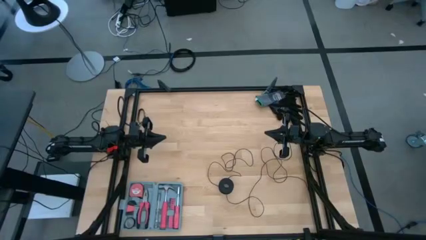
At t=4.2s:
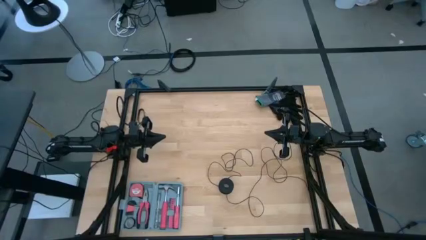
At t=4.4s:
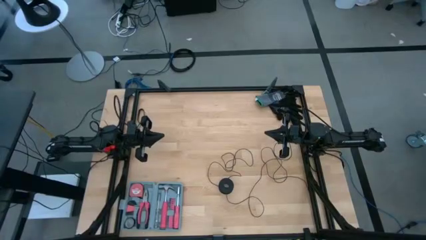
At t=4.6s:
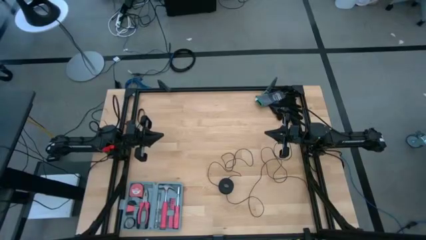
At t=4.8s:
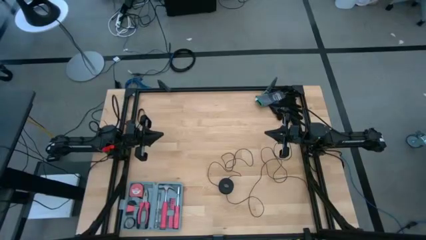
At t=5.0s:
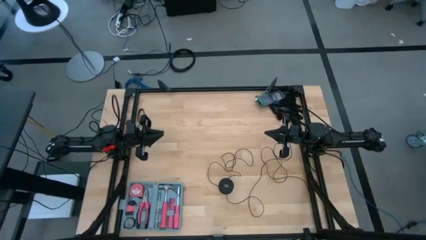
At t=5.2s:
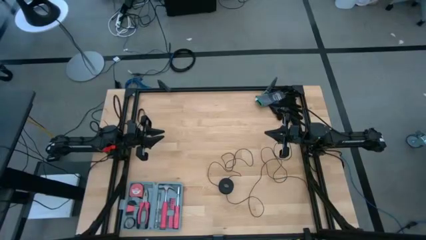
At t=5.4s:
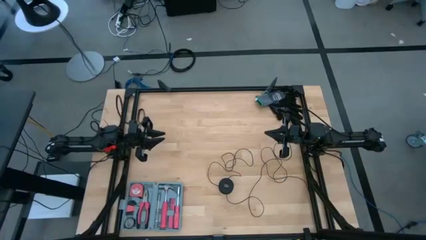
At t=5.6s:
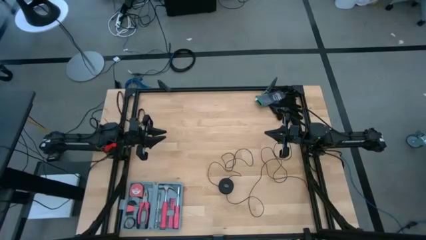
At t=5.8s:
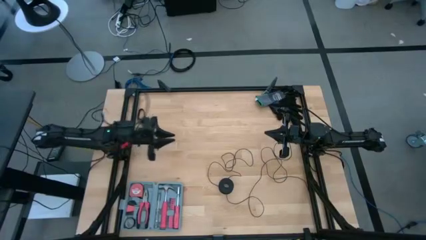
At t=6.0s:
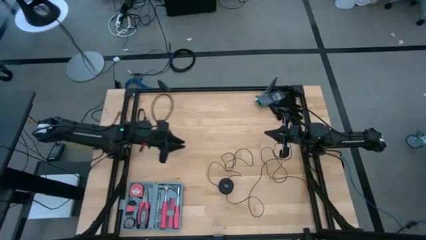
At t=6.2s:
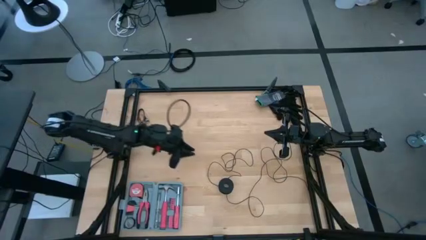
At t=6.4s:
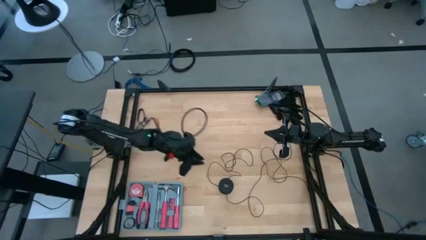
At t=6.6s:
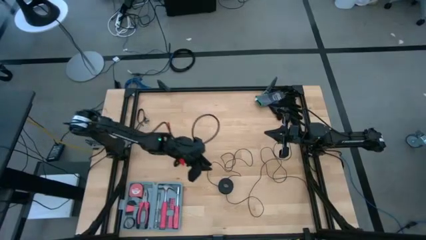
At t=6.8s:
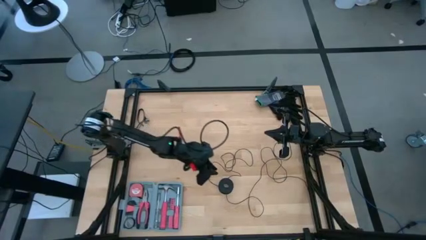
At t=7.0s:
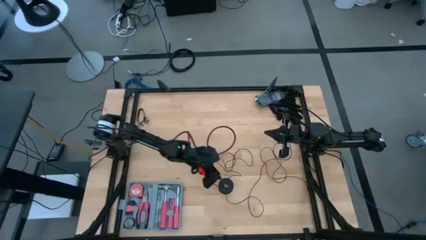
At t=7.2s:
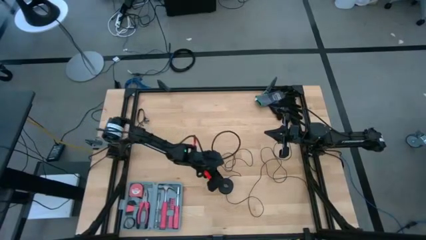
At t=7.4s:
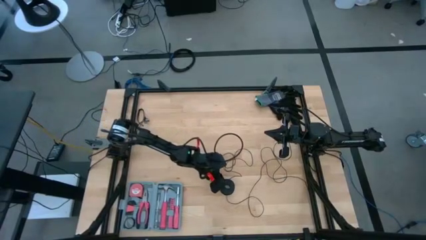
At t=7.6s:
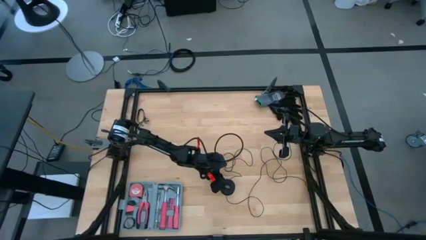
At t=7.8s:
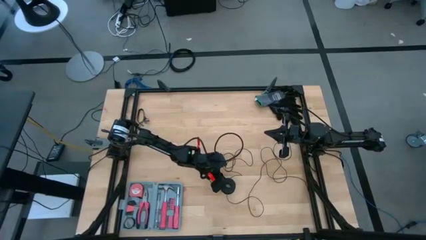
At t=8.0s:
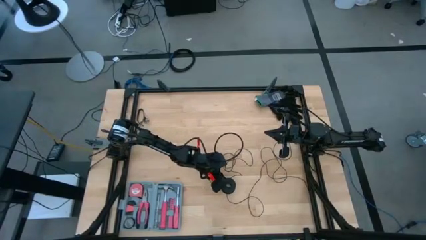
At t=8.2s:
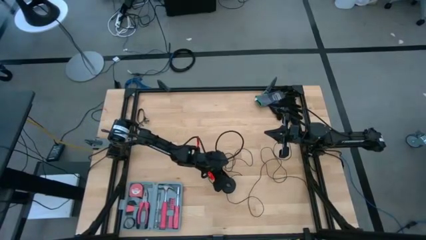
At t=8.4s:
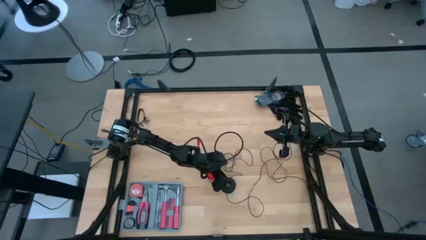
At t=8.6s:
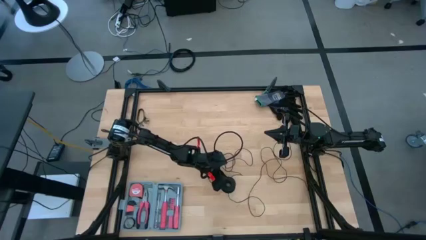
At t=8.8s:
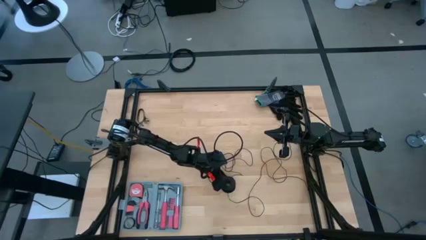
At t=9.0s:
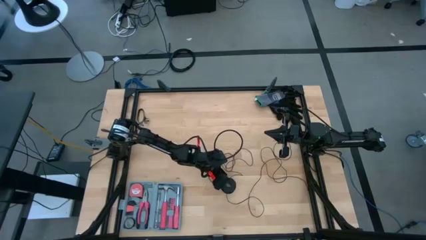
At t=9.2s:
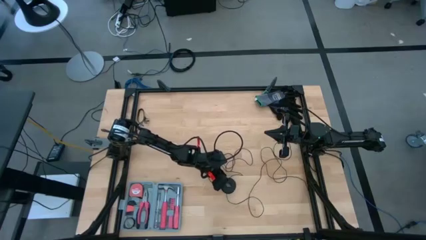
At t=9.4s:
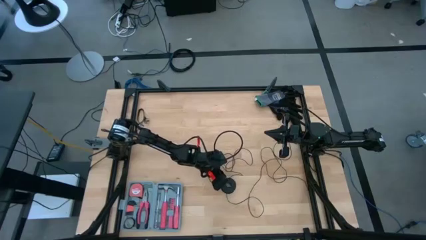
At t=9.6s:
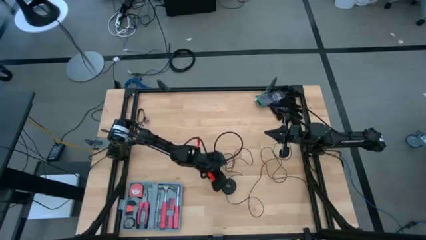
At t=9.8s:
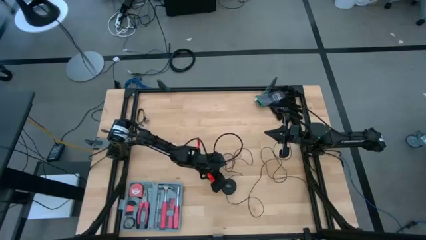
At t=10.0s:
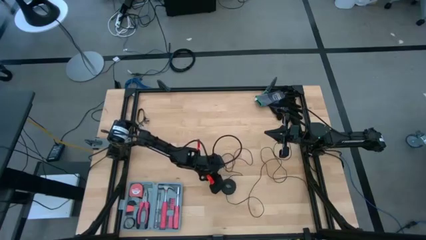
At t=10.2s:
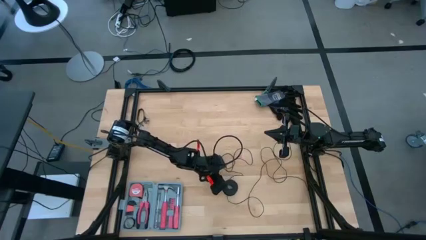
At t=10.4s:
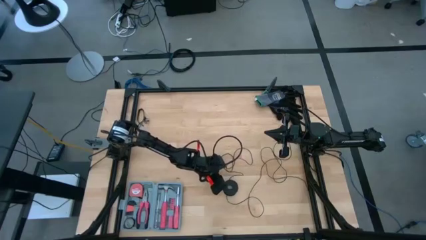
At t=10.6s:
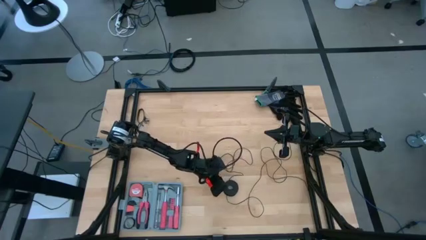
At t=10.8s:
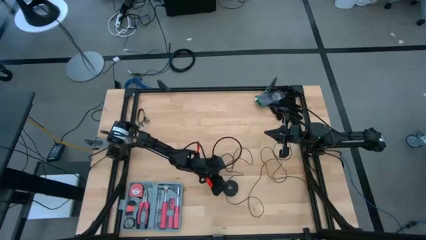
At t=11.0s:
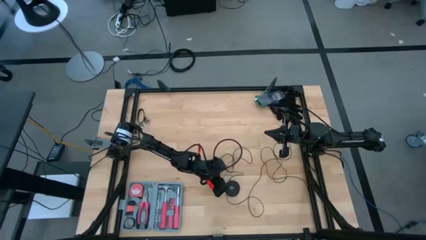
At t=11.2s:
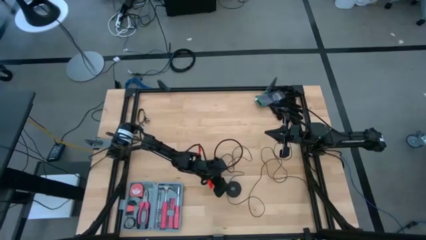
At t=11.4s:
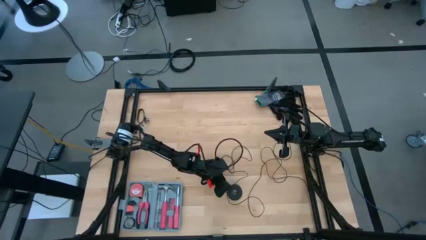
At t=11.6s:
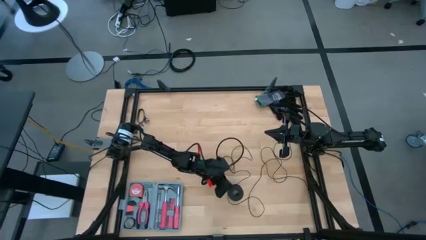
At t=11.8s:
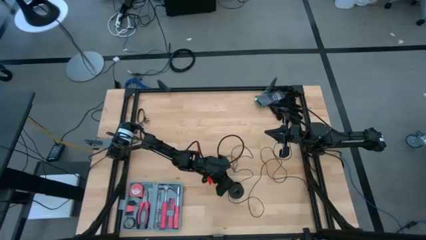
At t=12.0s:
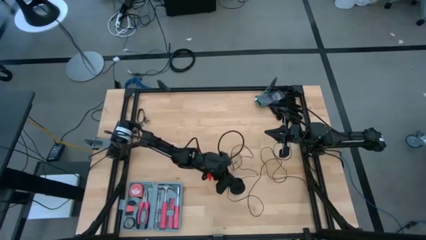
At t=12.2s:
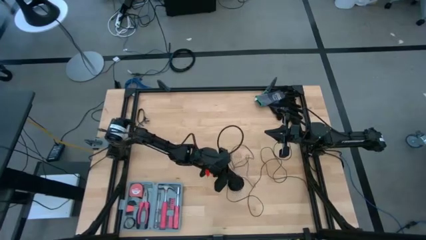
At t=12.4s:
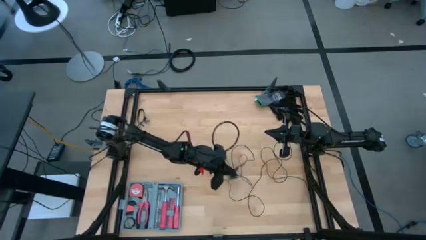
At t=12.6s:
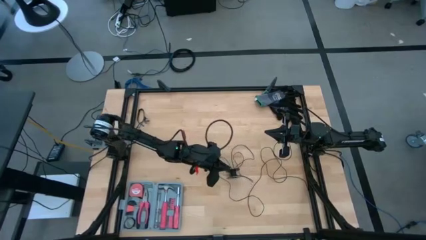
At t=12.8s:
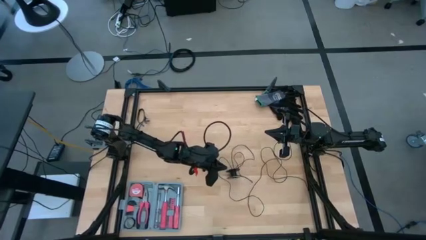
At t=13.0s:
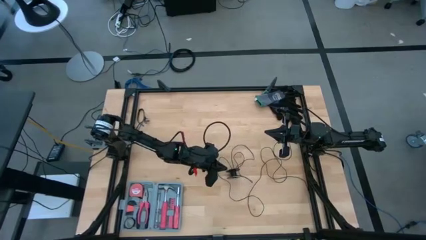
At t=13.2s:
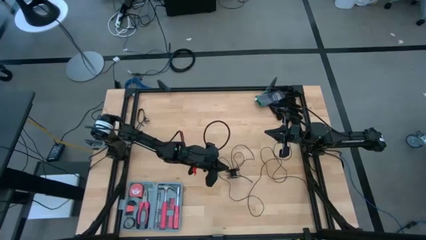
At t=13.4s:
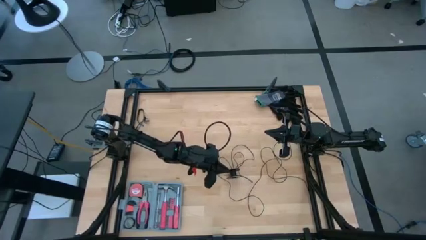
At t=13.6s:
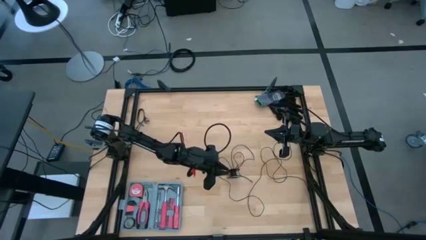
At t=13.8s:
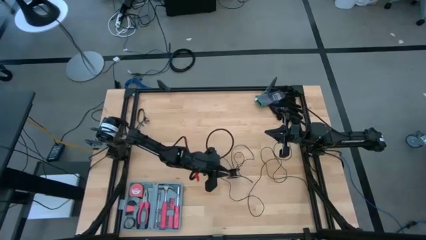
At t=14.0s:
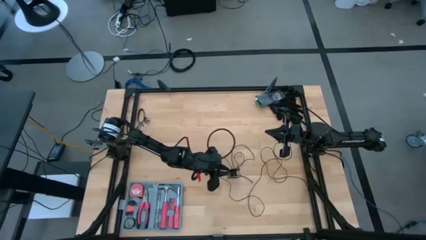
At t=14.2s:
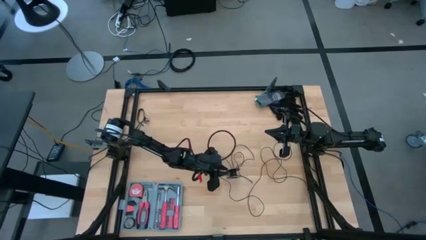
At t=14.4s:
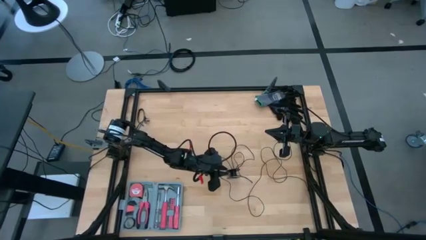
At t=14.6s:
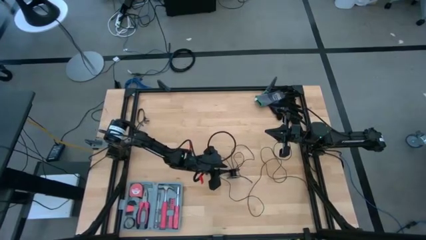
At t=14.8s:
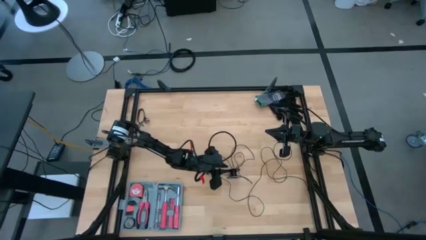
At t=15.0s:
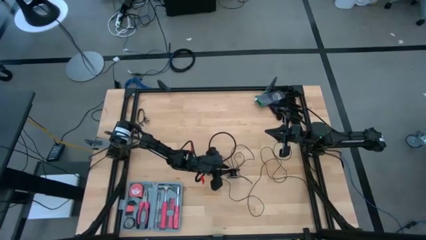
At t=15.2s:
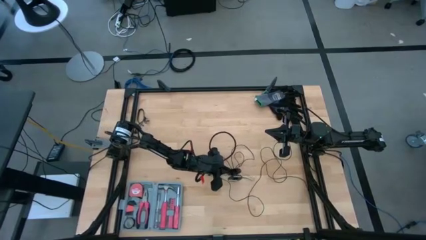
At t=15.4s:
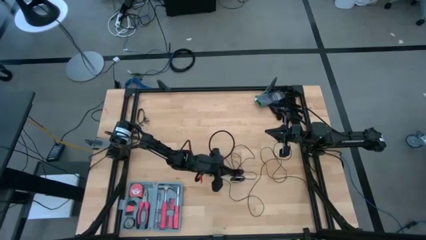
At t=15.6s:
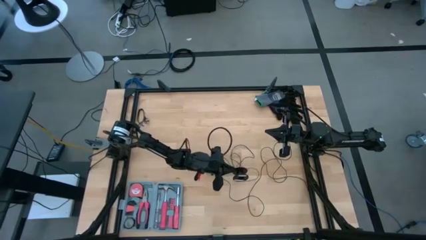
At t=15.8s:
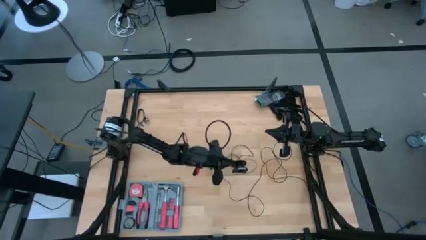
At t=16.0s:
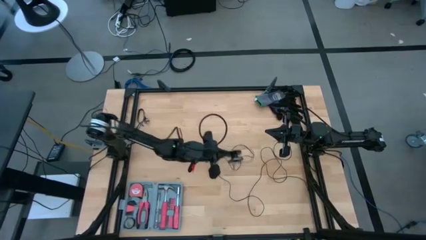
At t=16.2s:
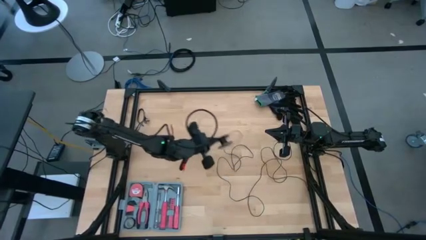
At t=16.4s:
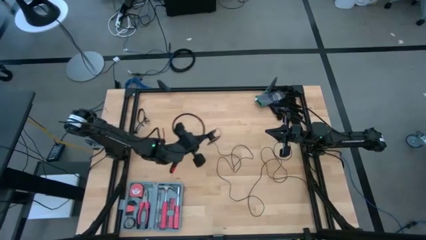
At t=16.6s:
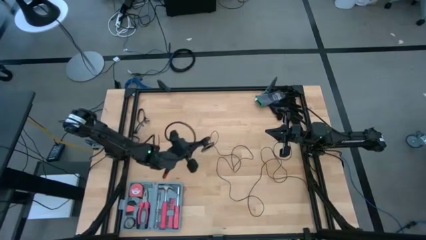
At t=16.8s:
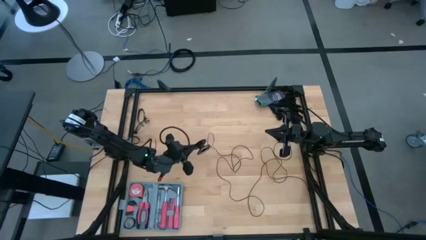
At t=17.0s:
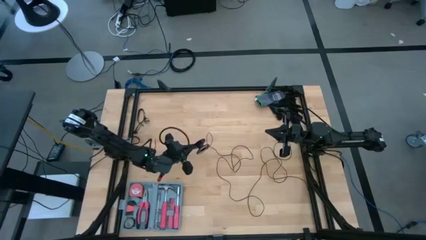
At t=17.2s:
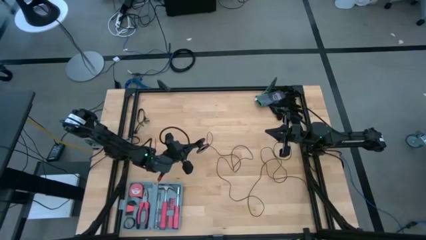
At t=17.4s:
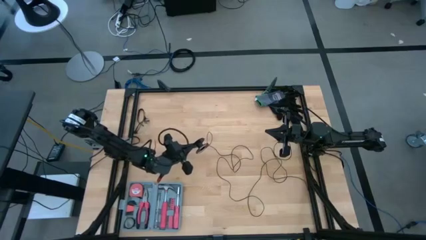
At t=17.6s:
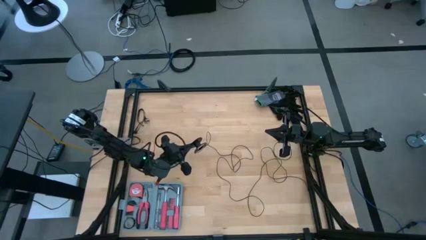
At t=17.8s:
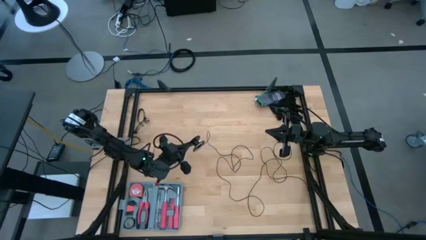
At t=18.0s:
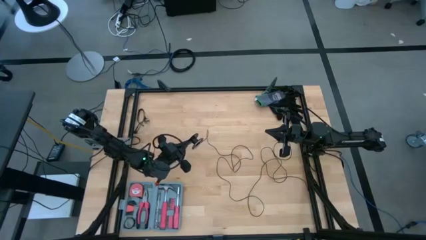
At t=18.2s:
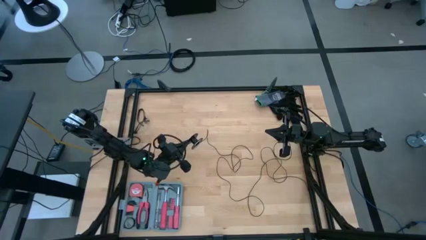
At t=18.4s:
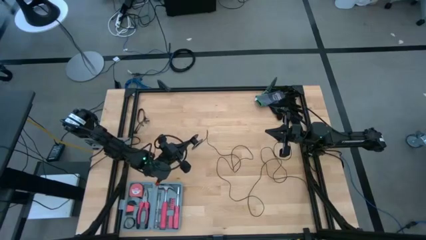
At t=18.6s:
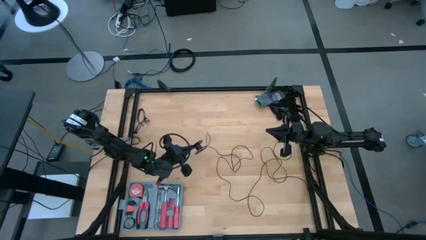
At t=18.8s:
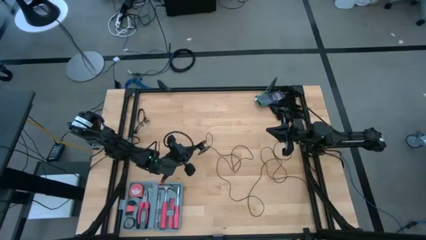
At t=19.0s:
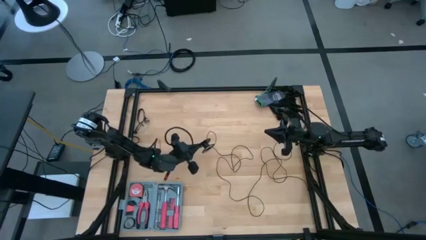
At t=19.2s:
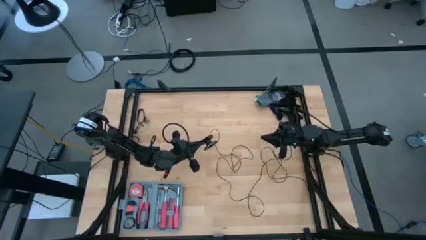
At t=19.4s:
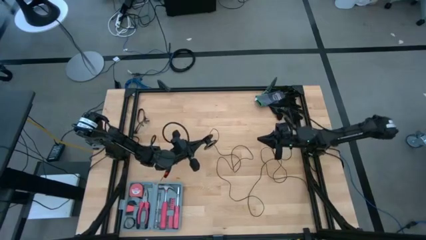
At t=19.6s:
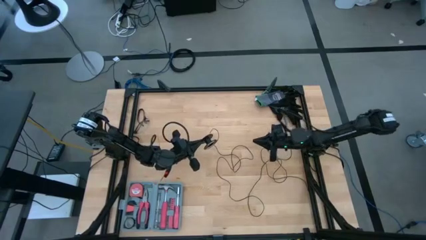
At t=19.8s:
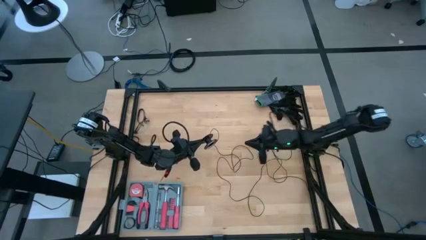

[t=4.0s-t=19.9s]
Task: Coil cords
Coil the black wire onto the spool
